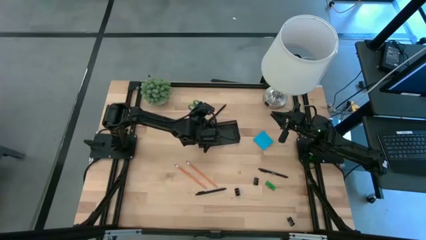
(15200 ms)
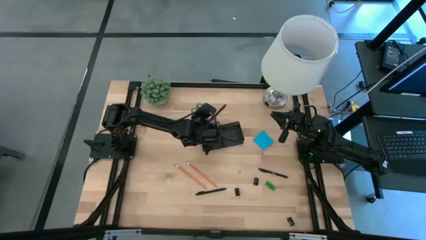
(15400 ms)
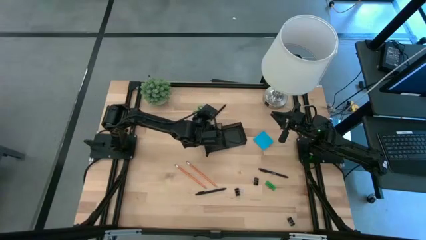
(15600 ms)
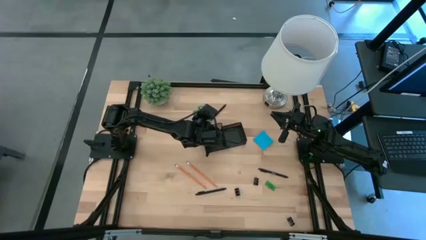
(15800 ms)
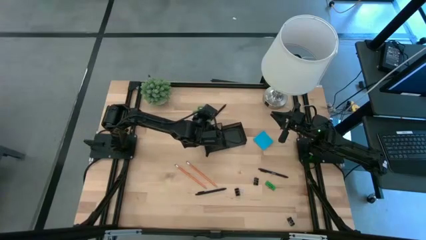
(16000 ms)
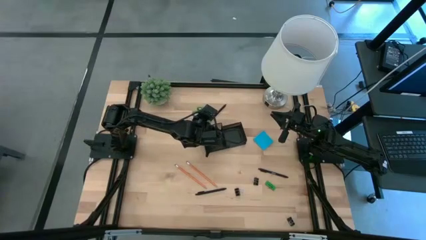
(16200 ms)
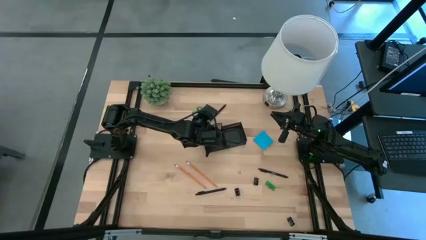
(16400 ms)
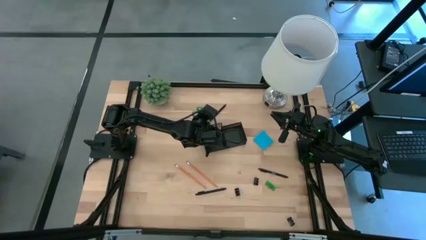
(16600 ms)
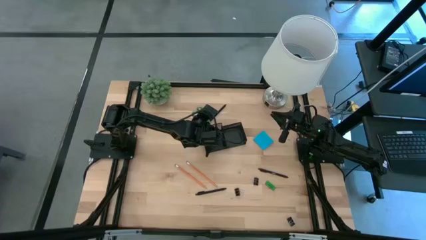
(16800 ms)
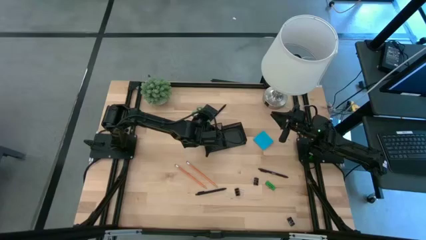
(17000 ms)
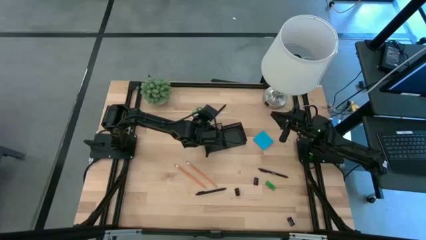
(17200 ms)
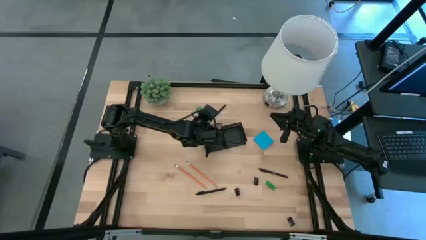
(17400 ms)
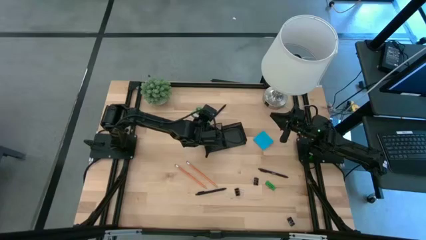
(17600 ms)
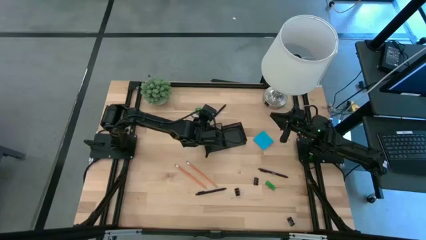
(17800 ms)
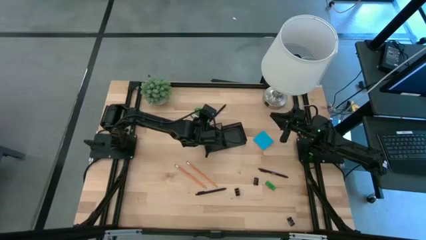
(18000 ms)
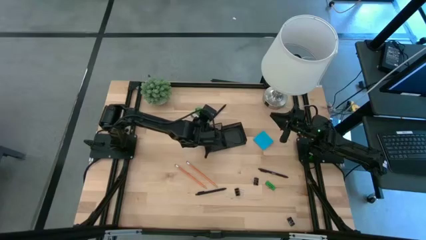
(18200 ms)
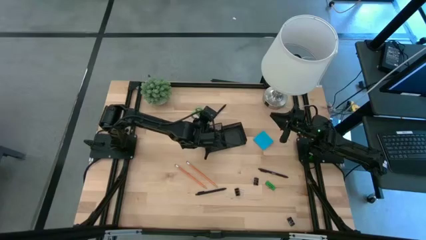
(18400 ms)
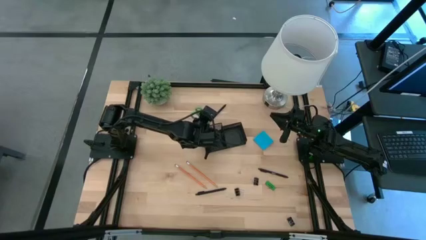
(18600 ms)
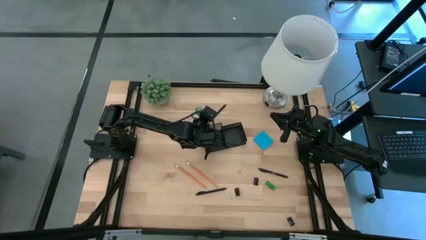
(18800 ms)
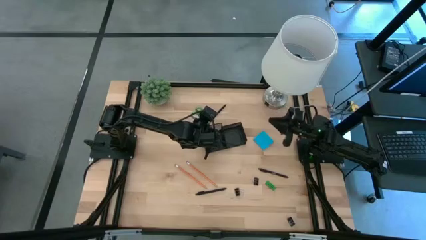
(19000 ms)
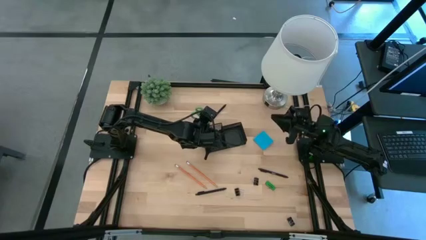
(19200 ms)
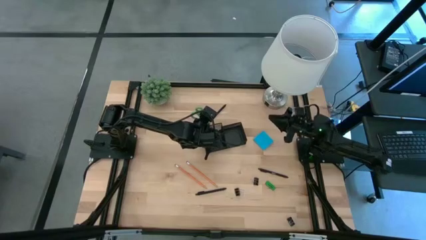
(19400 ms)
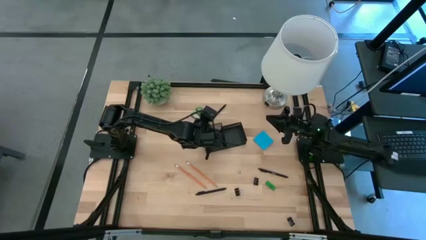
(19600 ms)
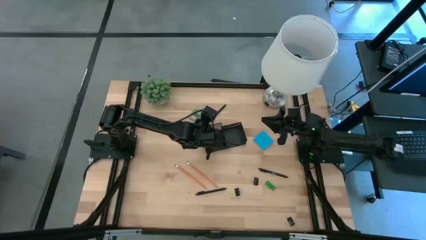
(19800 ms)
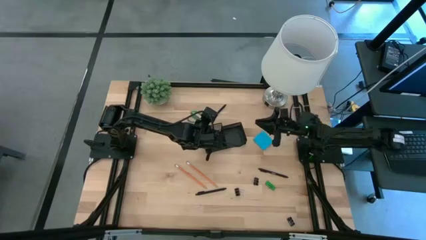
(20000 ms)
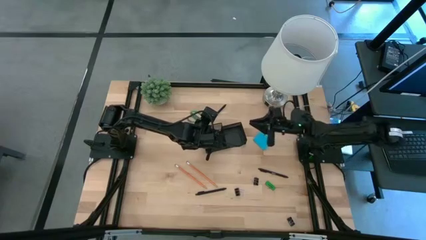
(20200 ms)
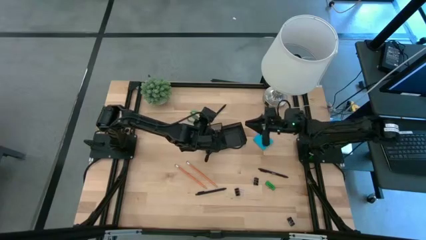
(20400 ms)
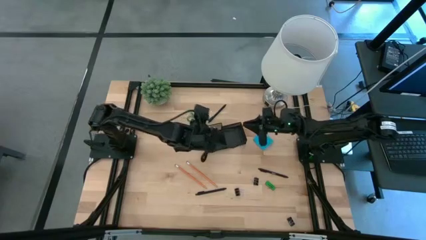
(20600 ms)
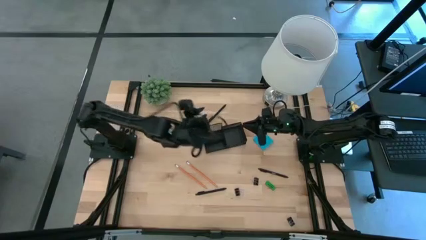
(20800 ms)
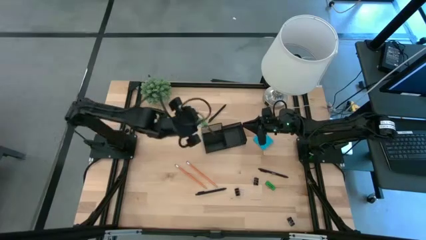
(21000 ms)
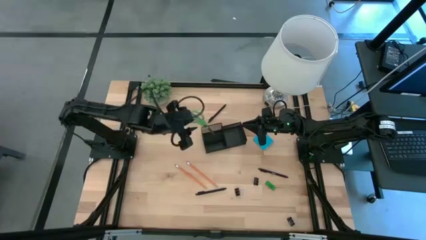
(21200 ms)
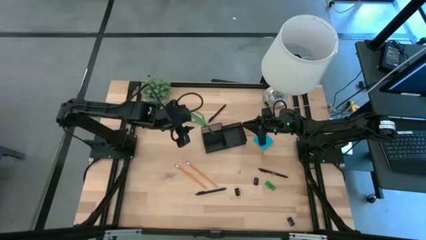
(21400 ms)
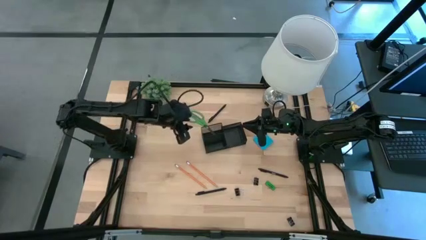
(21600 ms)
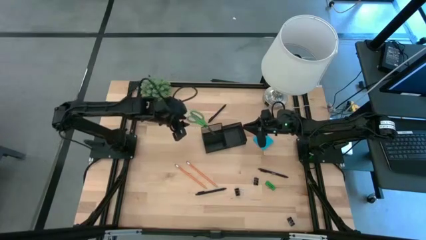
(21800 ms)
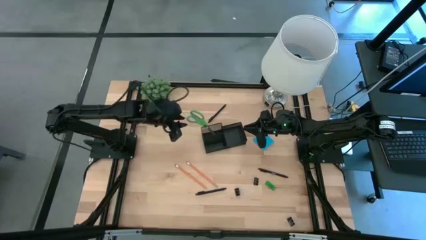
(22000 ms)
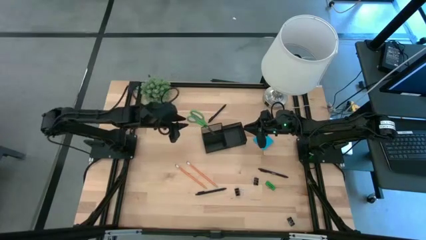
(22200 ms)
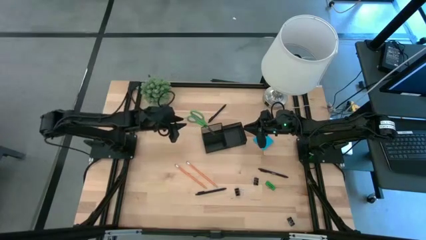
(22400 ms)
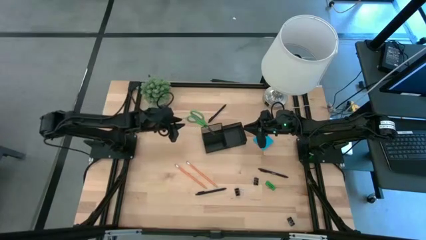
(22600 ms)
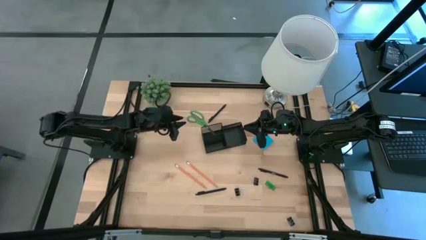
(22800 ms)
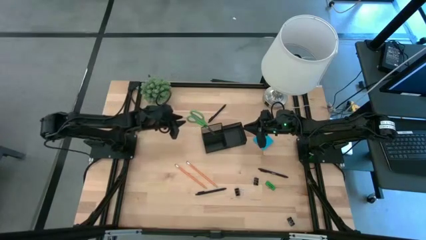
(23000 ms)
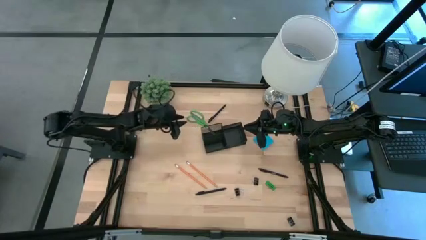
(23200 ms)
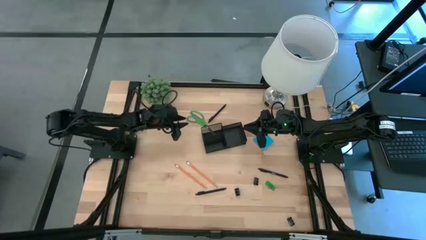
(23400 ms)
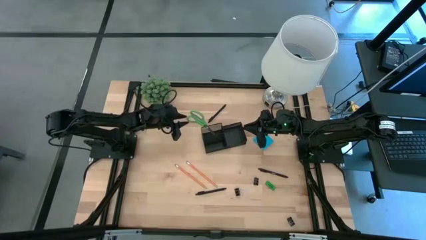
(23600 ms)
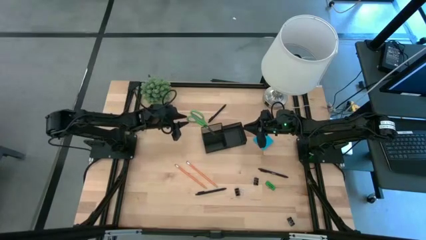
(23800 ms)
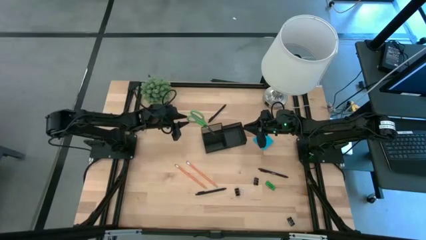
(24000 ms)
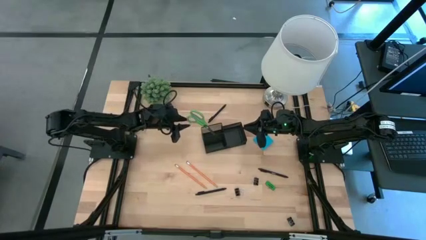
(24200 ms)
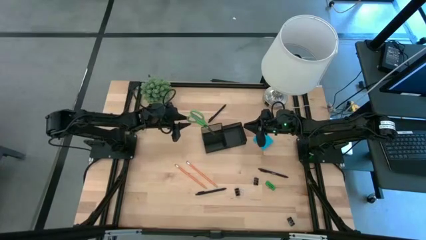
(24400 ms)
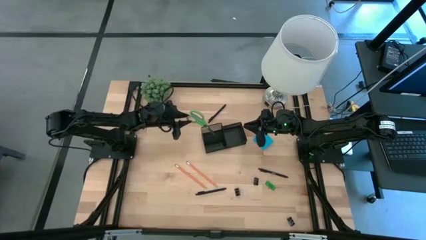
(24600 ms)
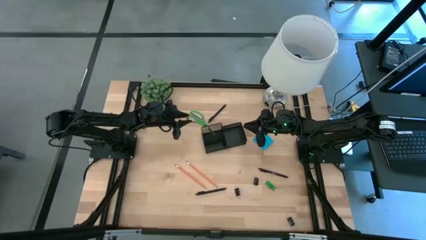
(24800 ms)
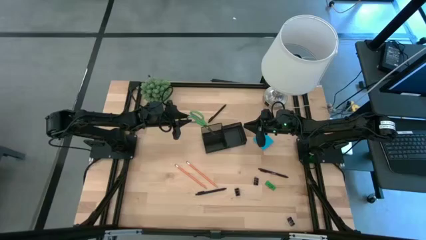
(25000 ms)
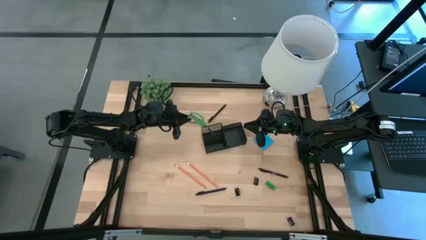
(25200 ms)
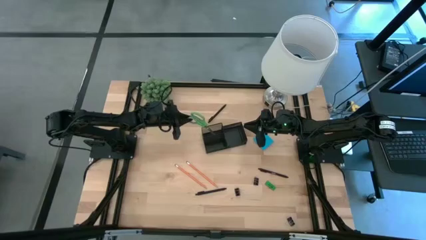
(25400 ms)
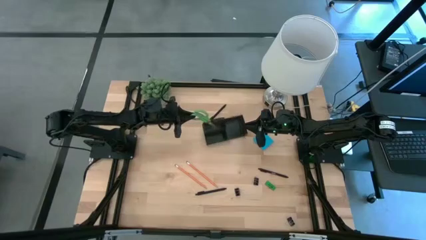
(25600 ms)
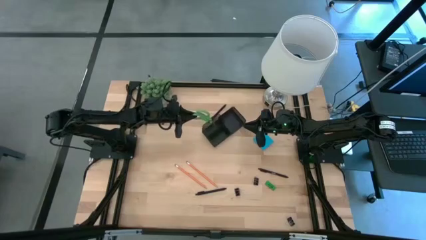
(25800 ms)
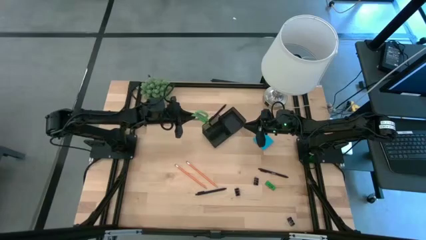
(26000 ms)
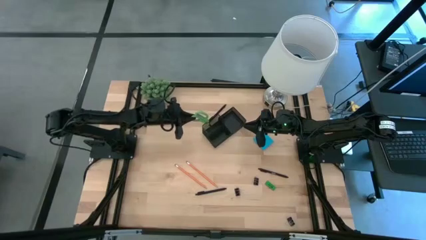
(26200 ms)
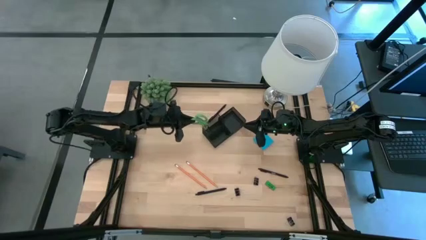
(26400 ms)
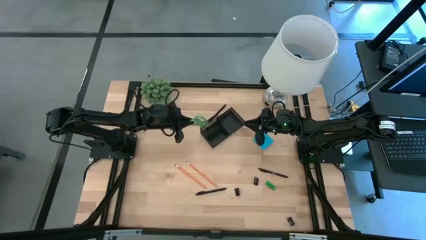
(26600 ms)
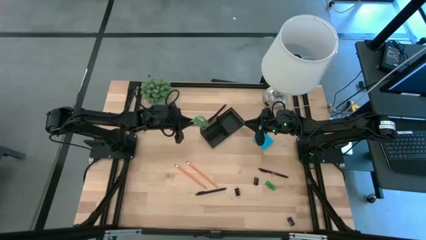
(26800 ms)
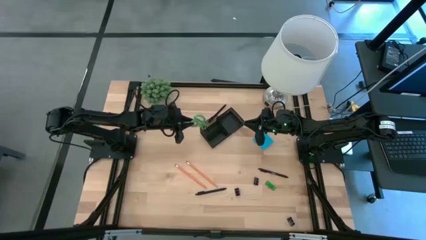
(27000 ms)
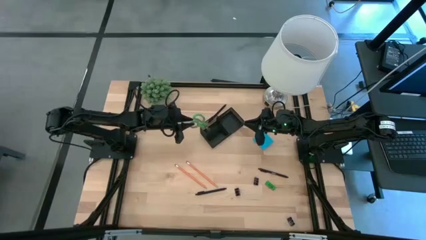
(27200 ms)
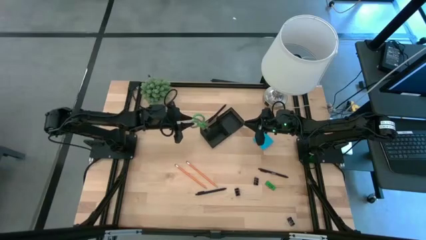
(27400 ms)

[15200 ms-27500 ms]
Task: Pick and place office supplies into organizer
Put the green scissors into the black organizer

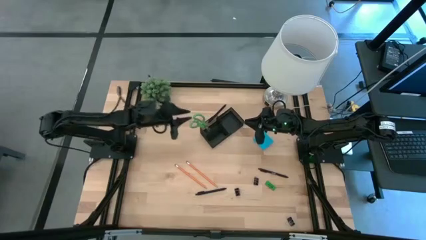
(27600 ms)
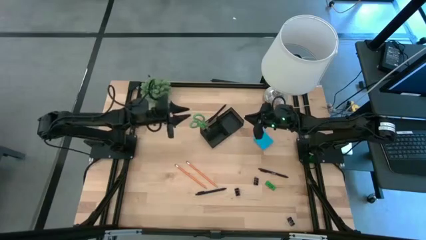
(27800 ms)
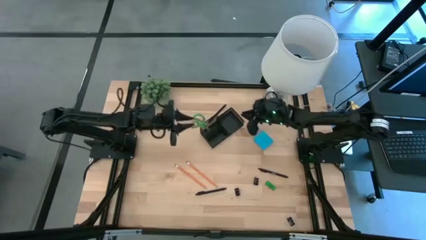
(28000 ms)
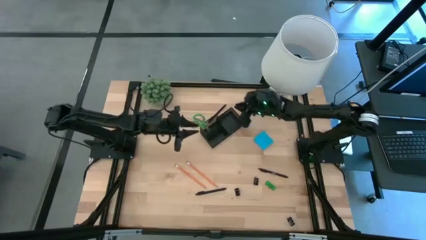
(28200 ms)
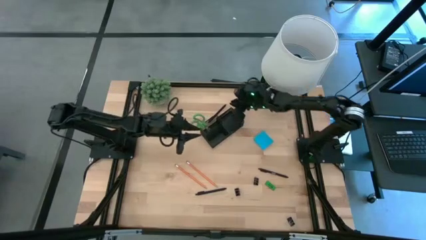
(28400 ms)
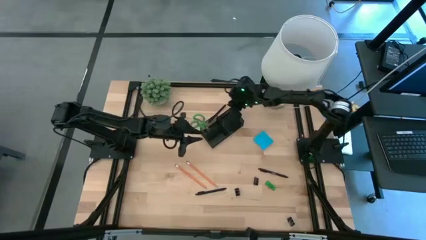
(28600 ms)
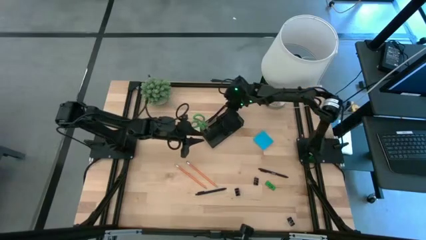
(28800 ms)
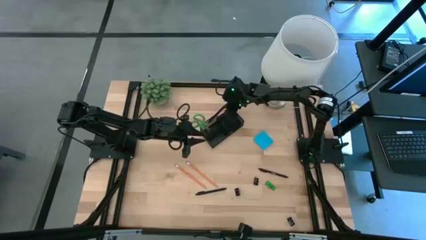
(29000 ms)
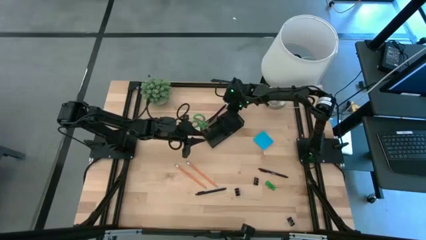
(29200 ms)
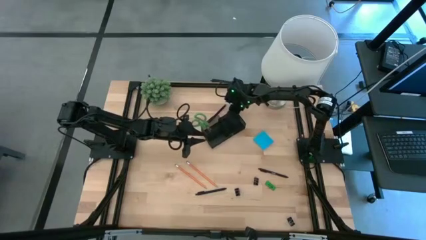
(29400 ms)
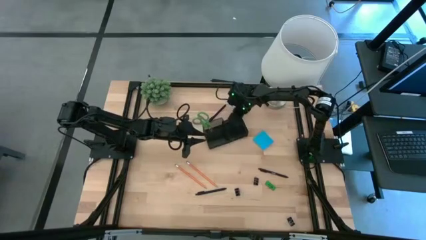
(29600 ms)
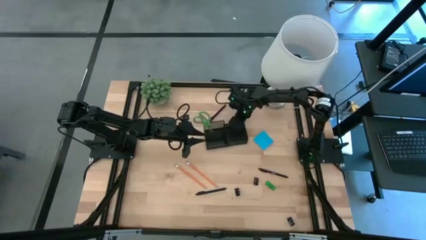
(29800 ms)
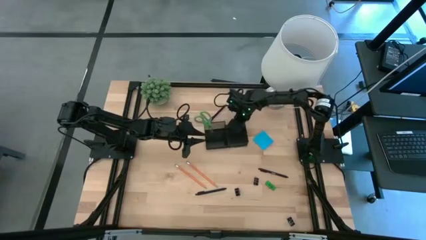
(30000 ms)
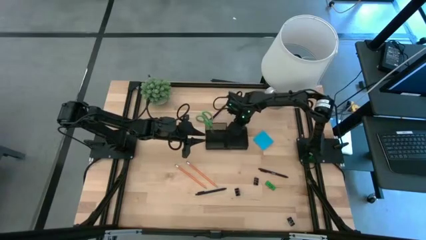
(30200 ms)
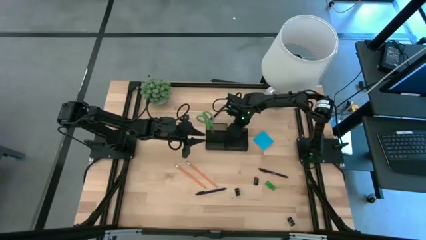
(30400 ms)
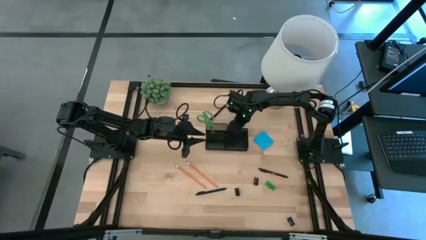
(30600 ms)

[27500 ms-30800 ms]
Adjust the black organizer
